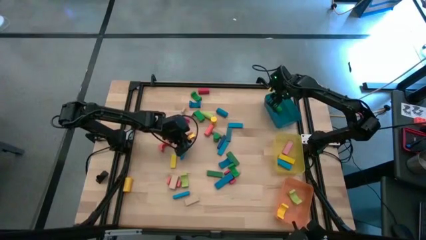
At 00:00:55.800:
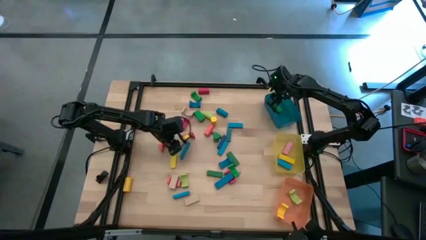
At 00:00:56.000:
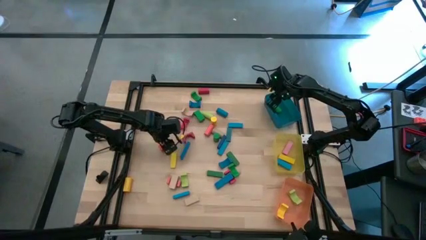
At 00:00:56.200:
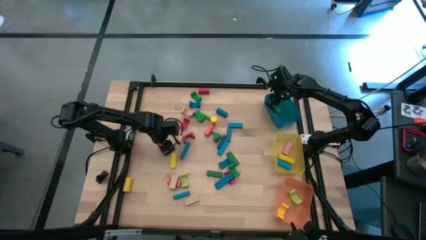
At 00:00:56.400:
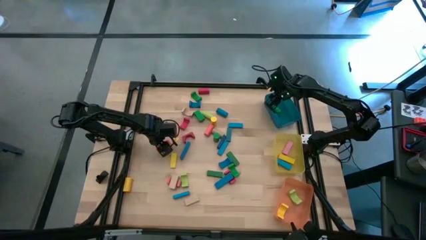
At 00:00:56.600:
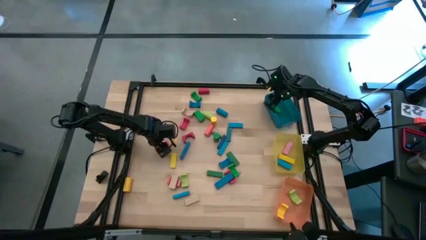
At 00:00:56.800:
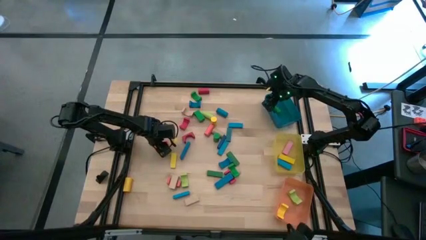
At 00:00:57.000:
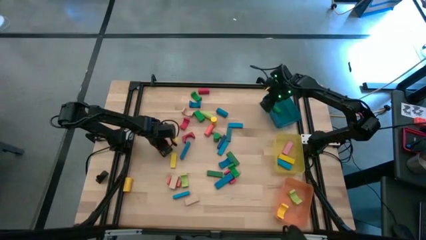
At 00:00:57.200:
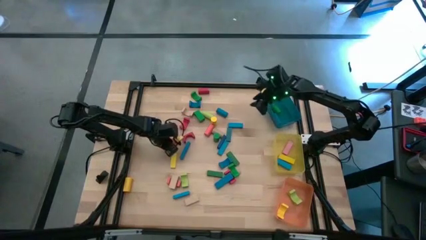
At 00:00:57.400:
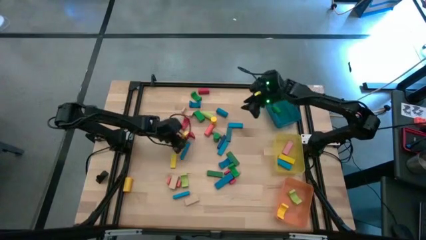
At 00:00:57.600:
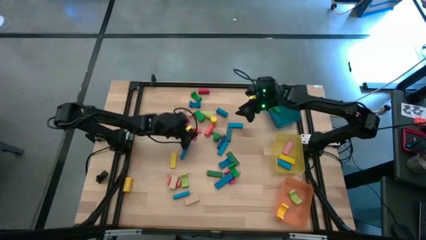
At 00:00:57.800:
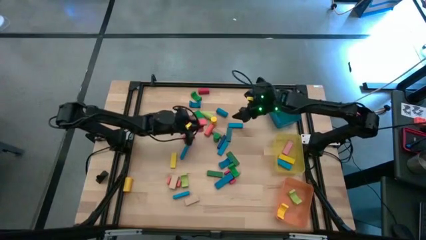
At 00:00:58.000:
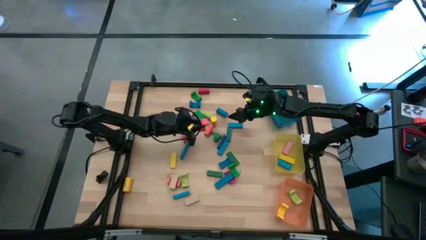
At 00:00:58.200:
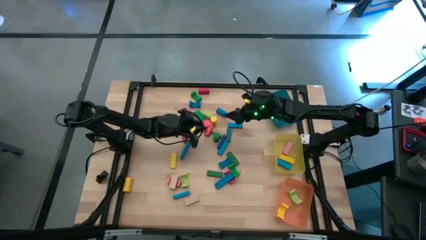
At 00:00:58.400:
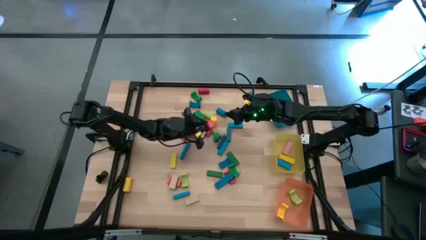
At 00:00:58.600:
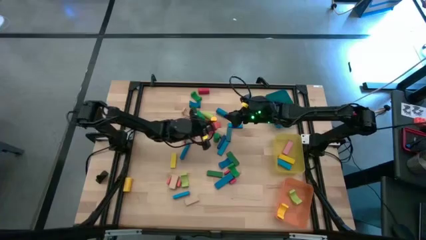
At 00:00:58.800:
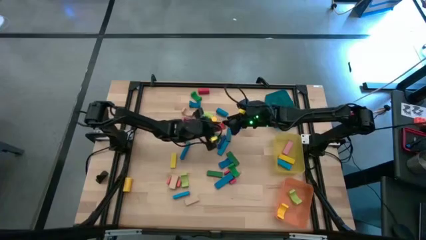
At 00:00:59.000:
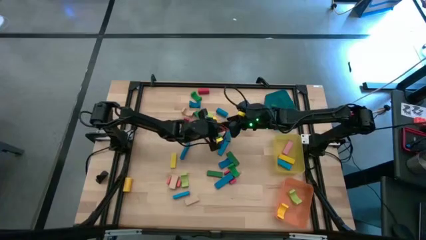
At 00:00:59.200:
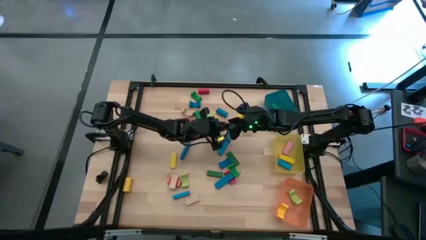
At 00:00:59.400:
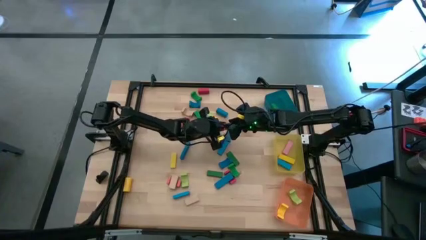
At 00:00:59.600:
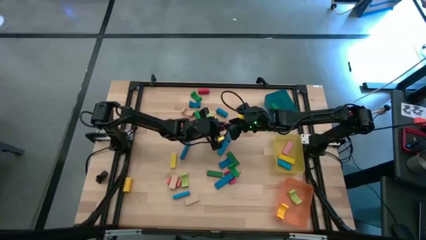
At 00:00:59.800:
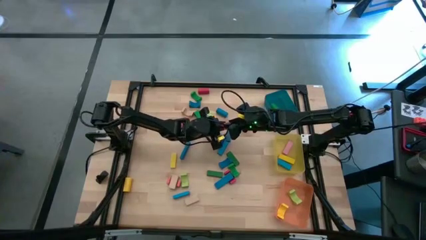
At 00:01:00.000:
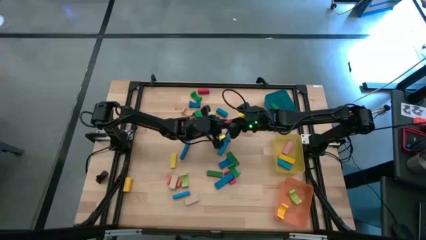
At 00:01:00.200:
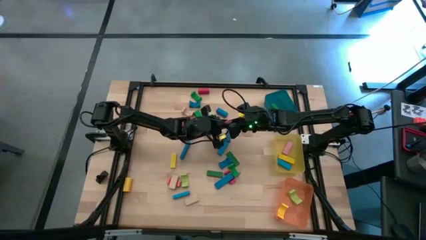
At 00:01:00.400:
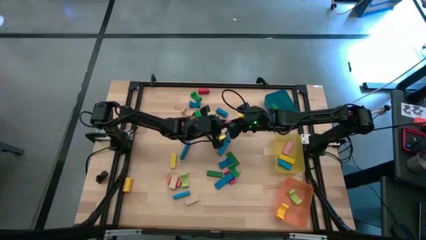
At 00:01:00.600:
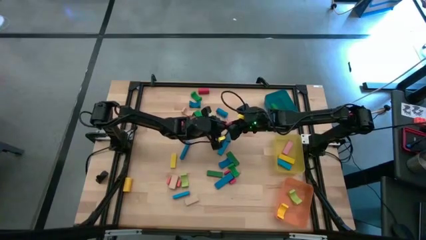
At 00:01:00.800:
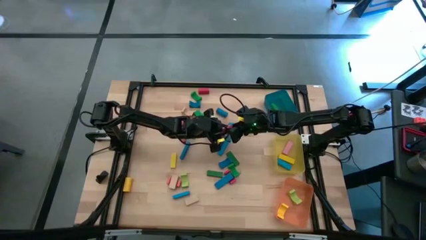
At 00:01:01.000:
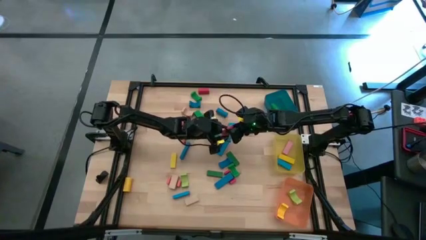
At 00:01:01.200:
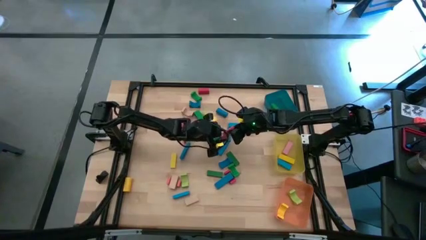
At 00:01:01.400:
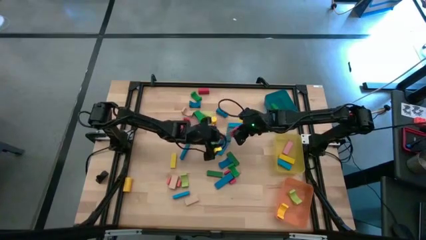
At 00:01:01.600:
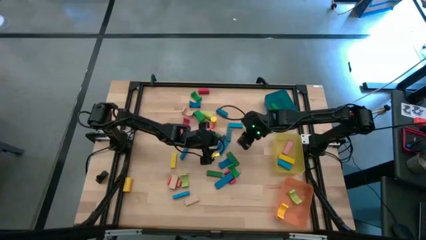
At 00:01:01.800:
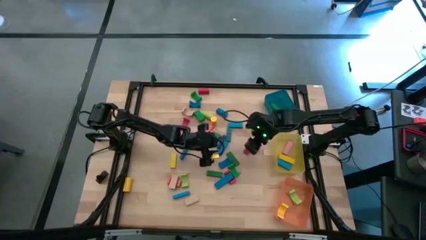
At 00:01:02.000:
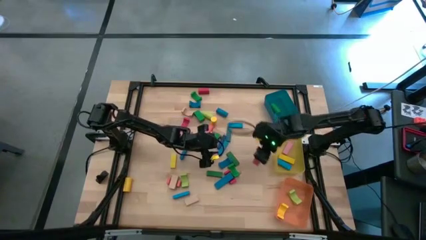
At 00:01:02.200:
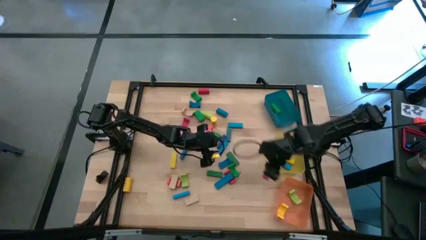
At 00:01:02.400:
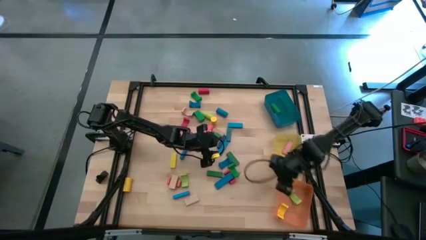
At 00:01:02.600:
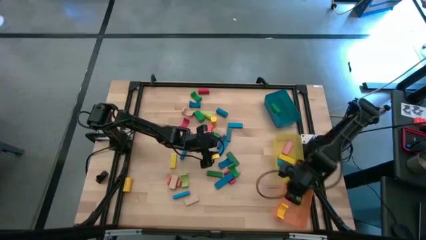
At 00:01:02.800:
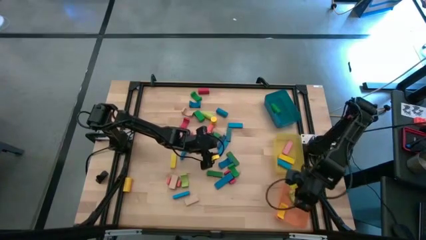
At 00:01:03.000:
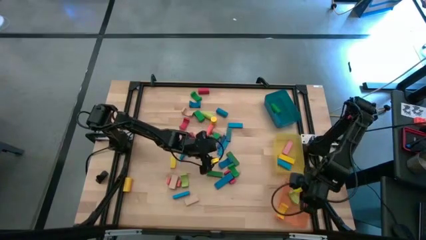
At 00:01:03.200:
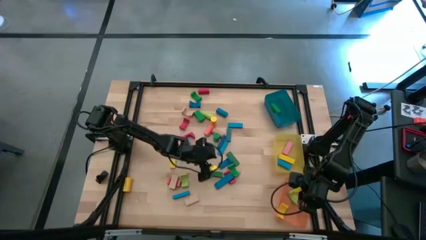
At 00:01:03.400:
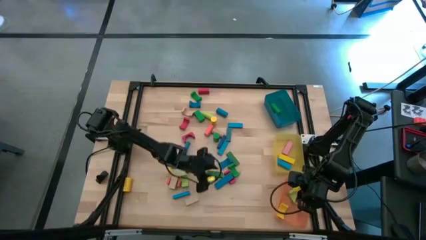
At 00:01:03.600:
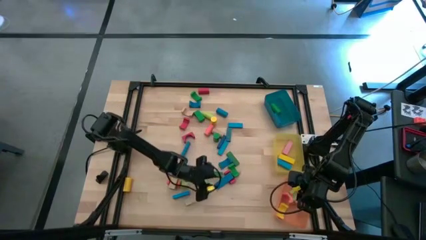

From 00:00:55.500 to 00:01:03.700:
Task: Sort blocks by size
Put the orange arch block into the orange bin

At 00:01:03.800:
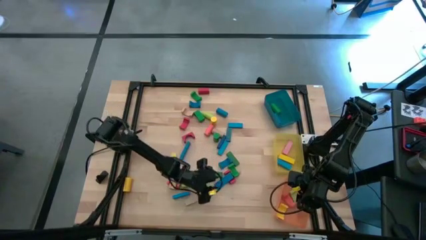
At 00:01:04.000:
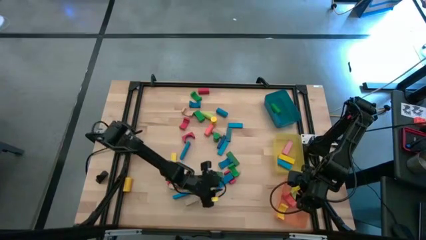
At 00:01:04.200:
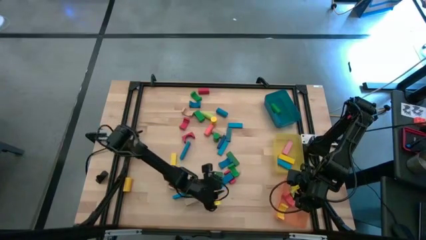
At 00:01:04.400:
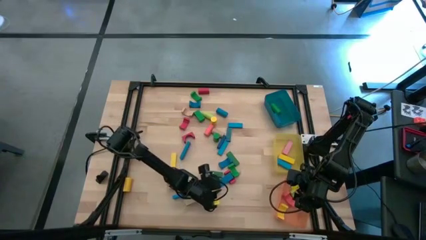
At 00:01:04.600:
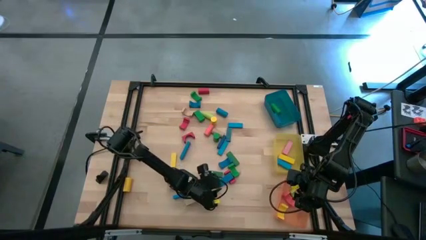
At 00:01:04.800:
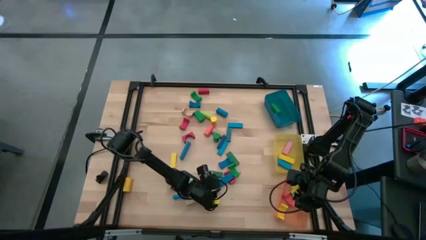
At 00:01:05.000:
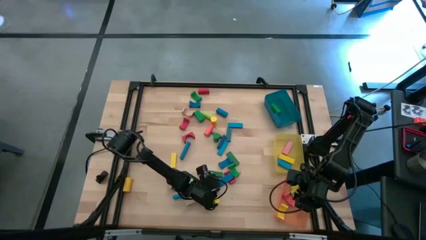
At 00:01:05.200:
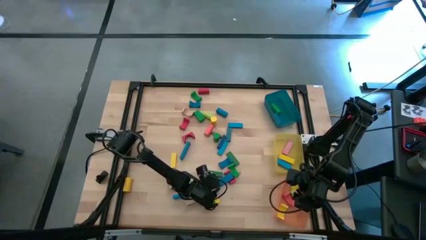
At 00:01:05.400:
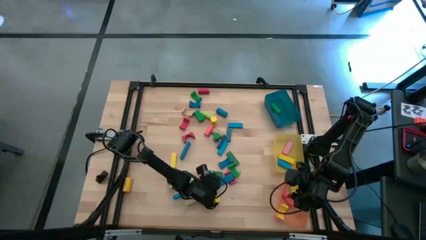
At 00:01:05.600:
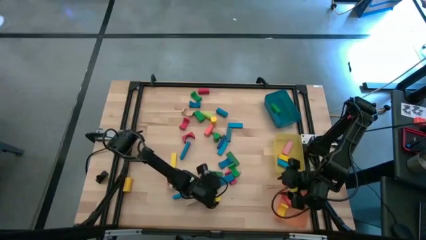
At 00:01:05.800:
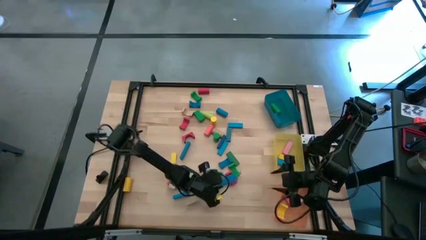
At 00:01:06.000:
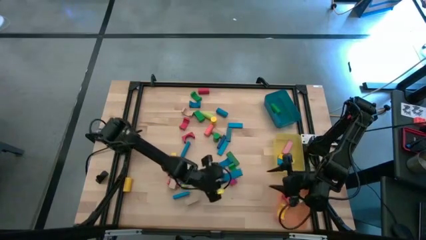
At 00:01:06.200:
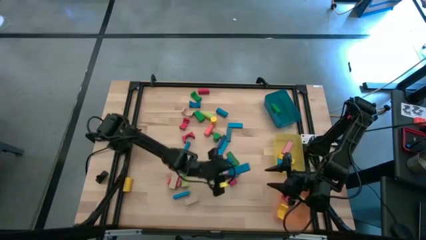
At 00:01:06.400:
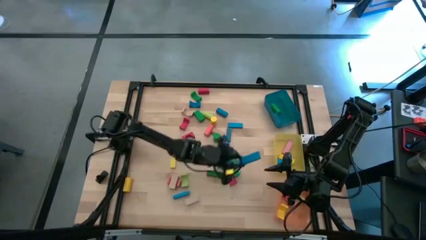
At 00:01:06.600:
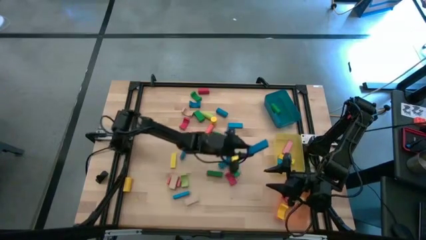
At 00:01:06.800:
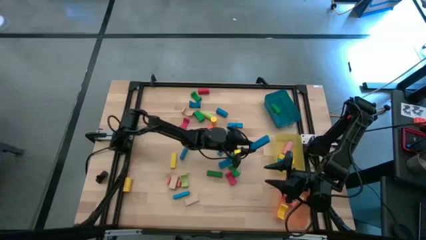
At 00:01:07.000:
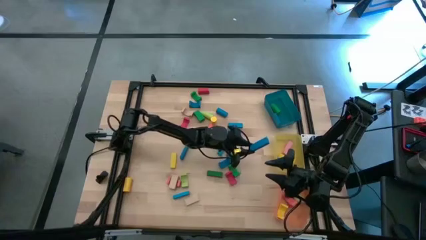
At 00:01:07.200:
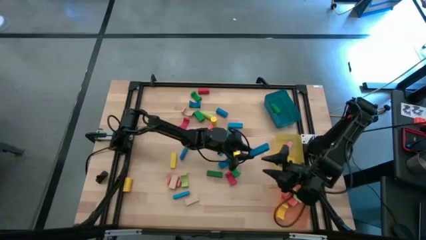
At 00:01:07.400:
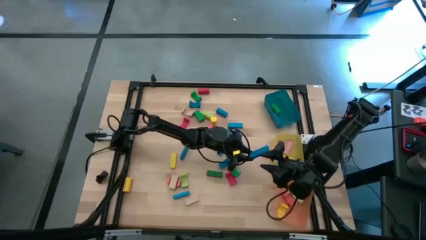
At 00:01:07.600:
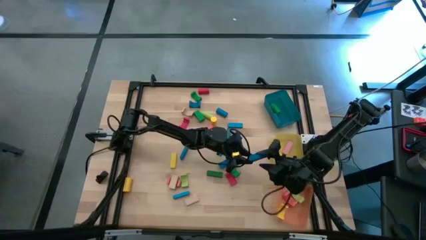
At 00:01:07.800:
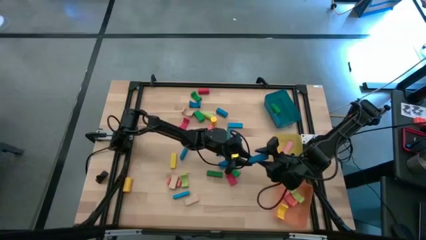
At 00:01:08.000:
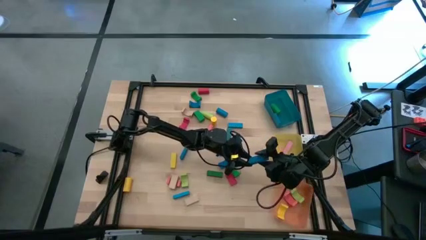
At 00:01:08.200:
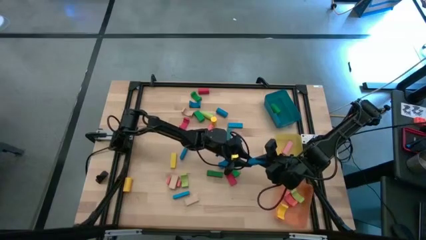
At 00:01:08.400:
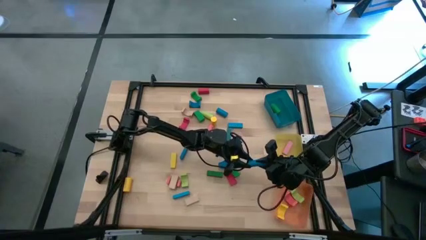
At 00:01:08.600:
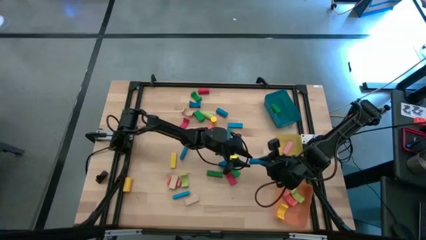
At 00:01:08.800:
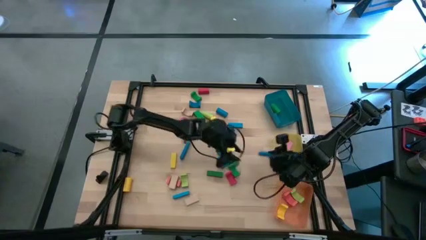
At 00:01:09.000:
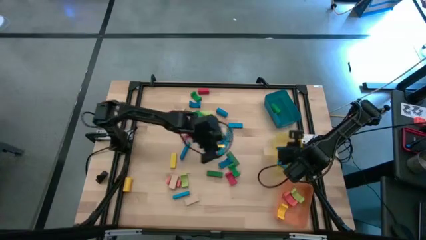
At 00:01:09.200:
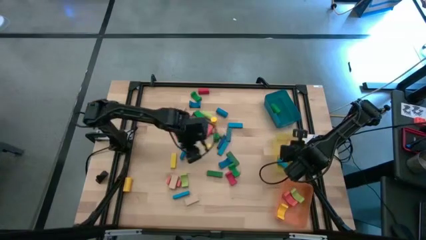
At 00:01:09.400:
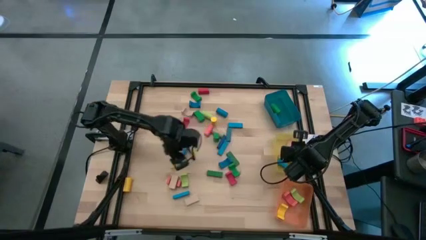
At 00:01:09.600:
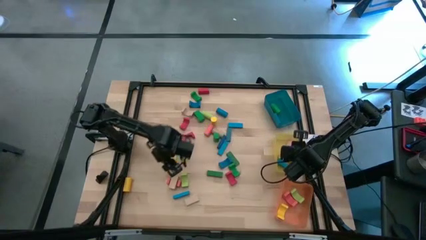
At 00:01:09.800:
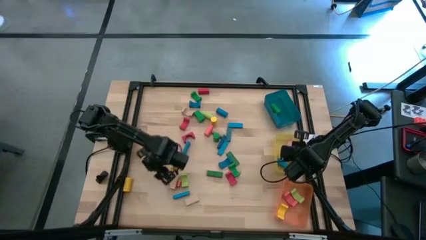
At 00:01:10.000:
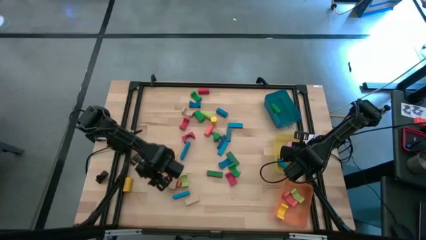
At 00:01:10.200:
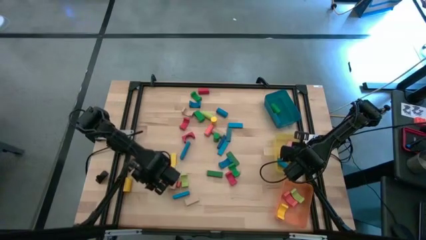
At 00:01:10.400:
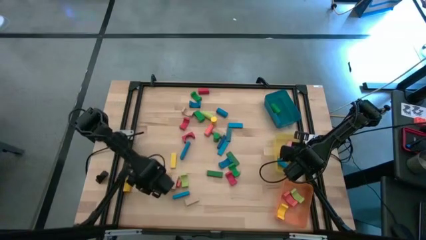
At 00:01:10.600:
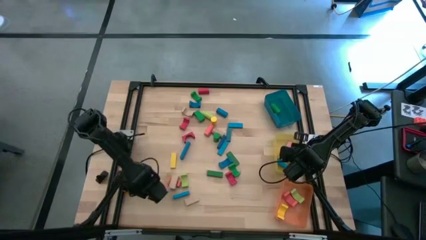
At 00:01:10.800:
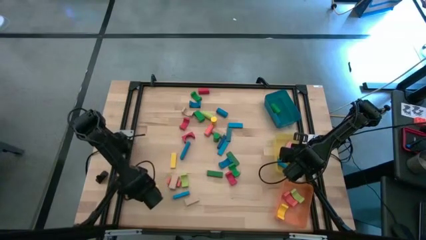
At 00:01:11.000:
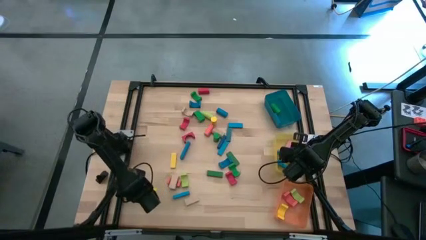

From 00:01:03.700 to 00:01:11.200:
Put the blue rectangular block into the yellow bin
